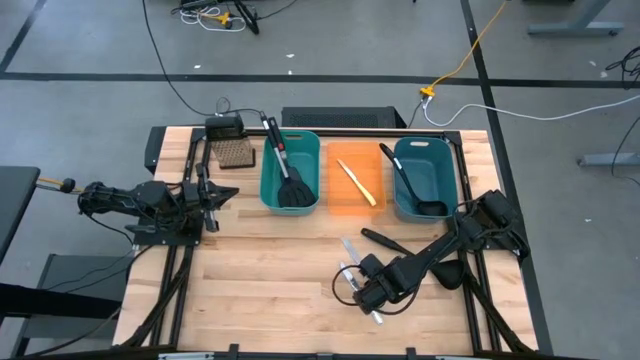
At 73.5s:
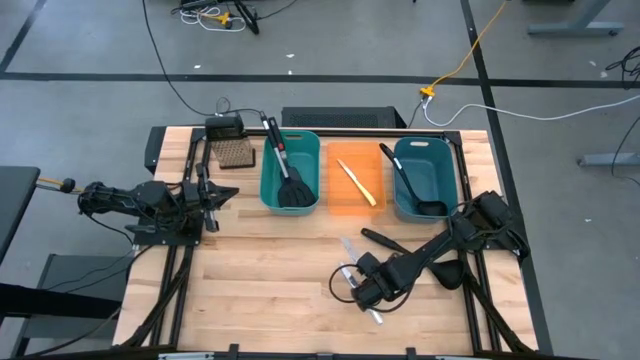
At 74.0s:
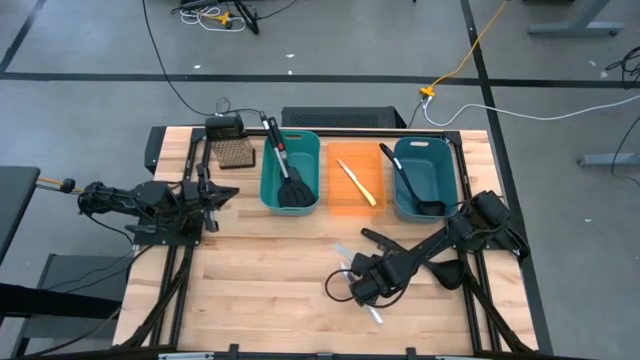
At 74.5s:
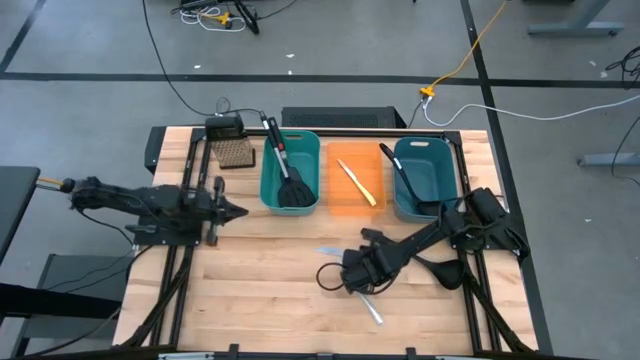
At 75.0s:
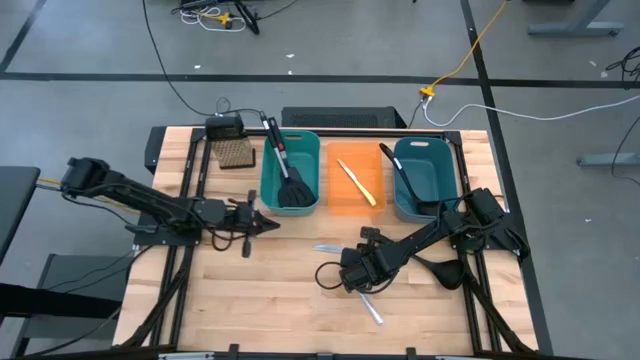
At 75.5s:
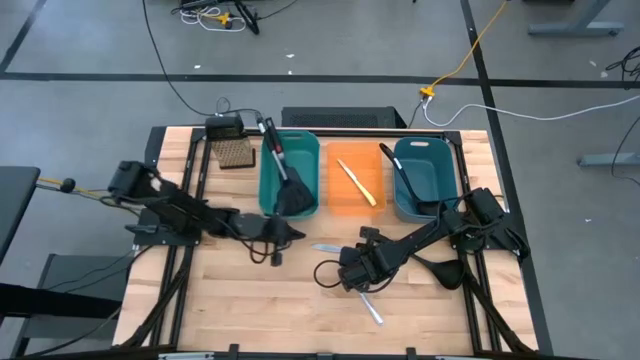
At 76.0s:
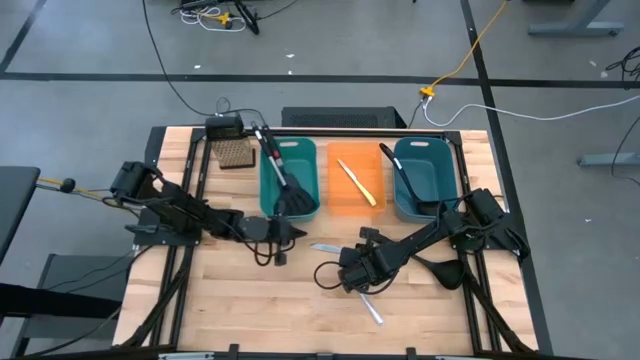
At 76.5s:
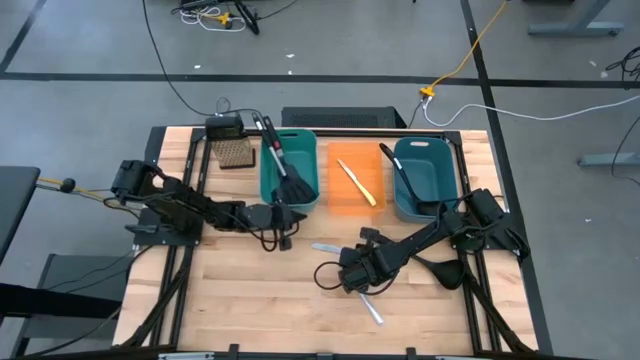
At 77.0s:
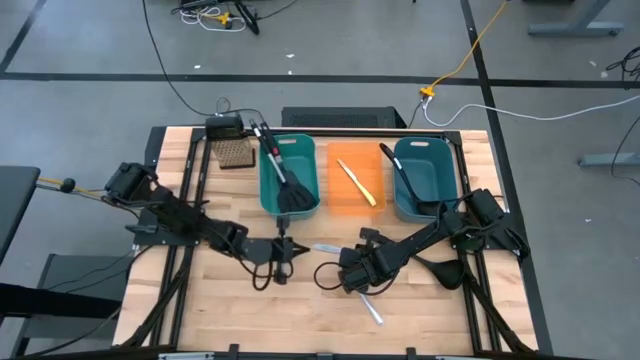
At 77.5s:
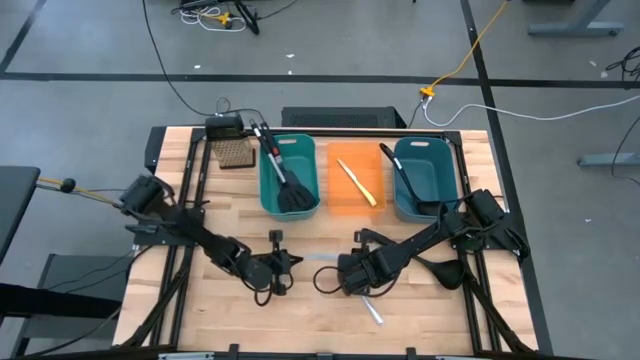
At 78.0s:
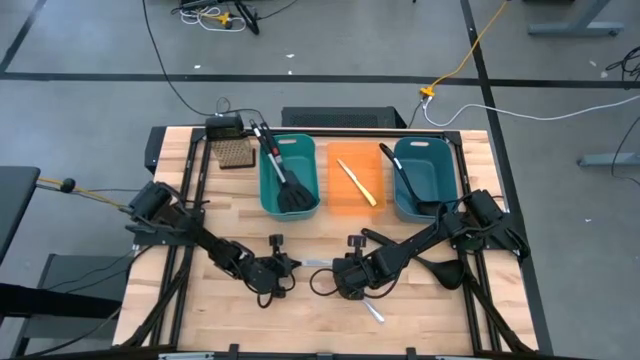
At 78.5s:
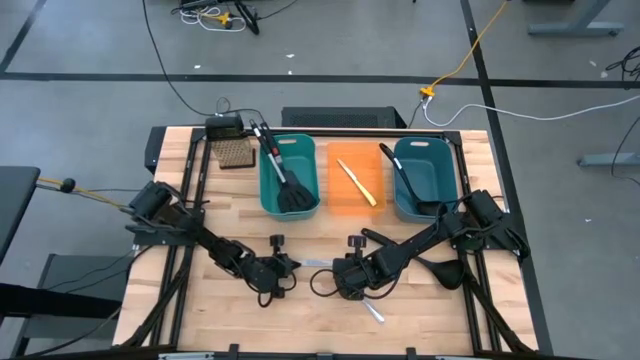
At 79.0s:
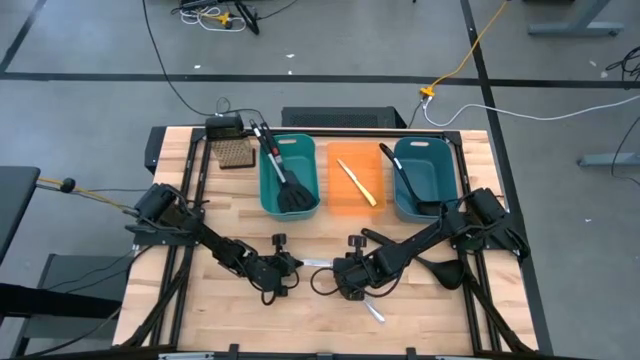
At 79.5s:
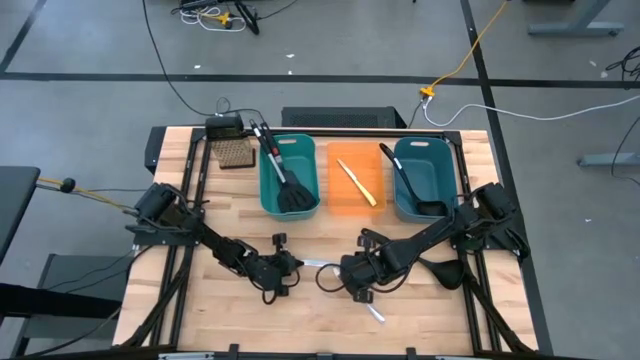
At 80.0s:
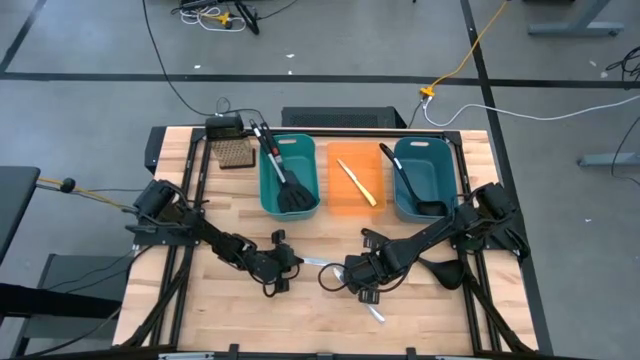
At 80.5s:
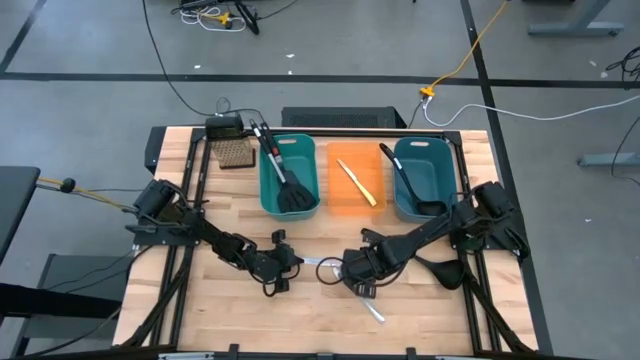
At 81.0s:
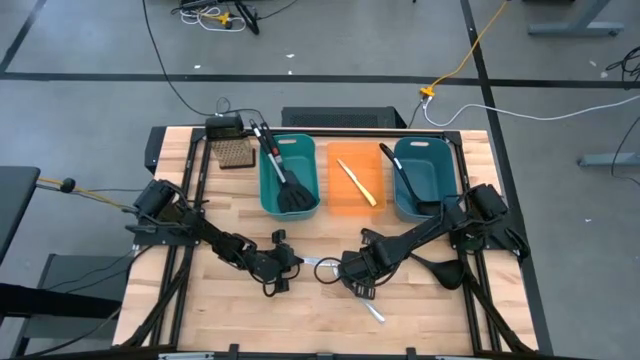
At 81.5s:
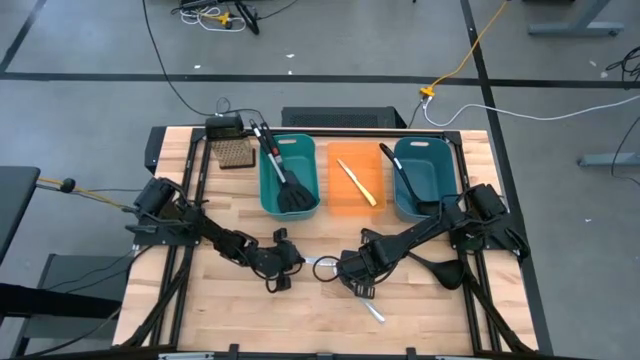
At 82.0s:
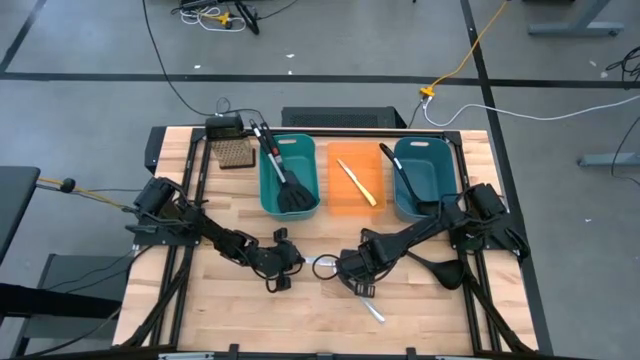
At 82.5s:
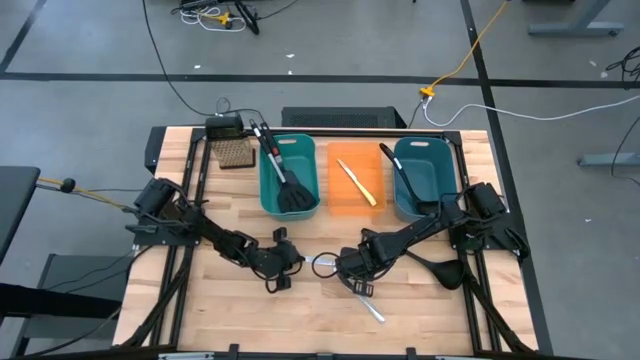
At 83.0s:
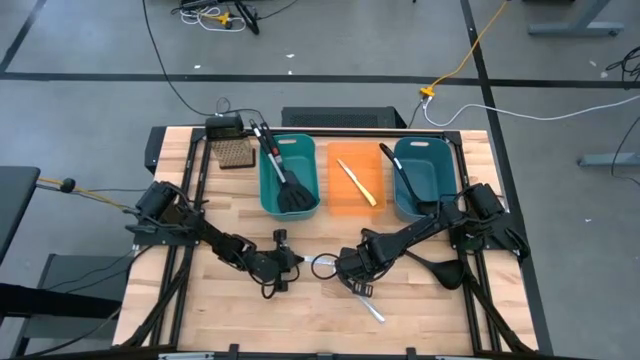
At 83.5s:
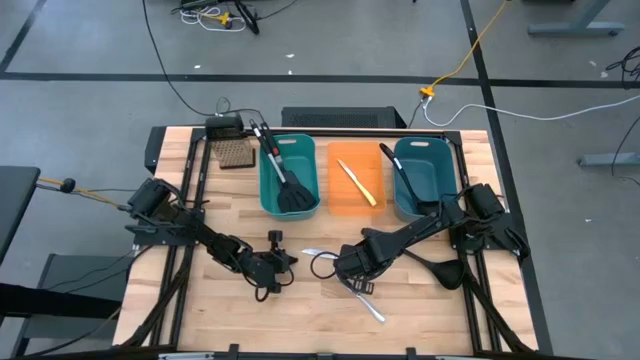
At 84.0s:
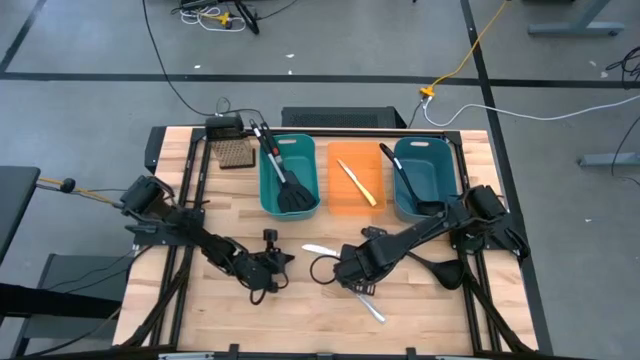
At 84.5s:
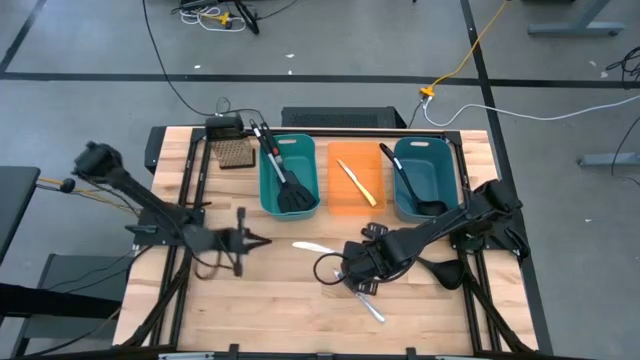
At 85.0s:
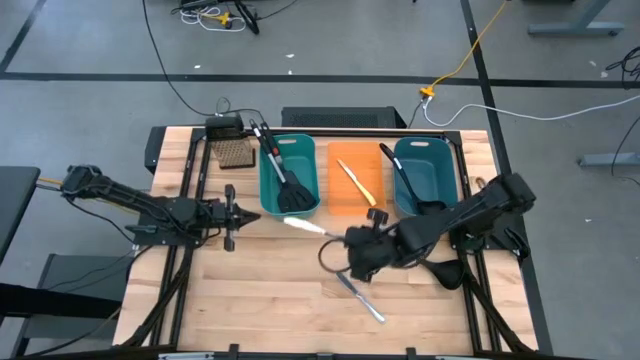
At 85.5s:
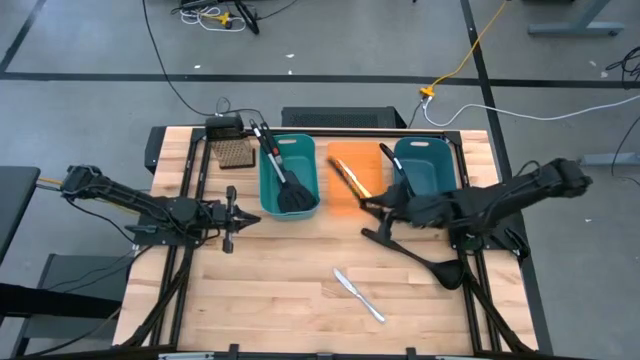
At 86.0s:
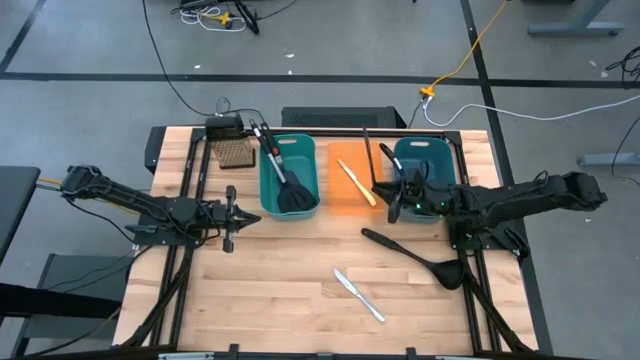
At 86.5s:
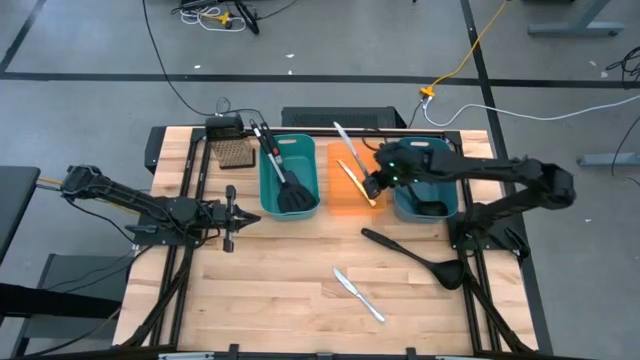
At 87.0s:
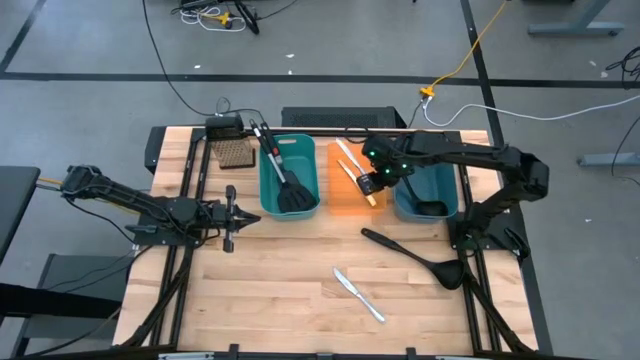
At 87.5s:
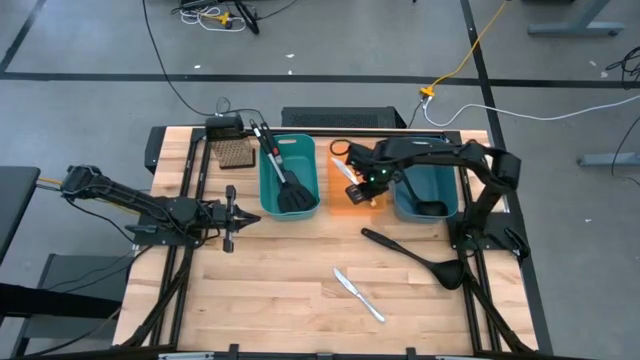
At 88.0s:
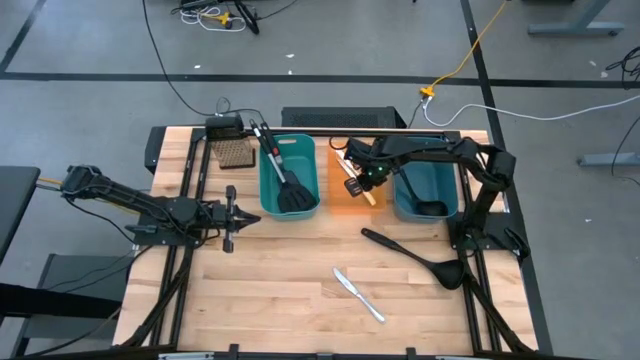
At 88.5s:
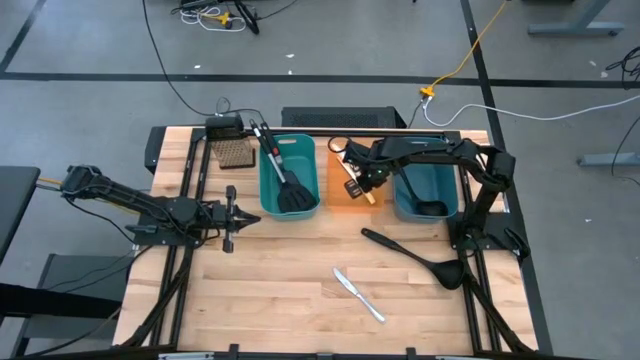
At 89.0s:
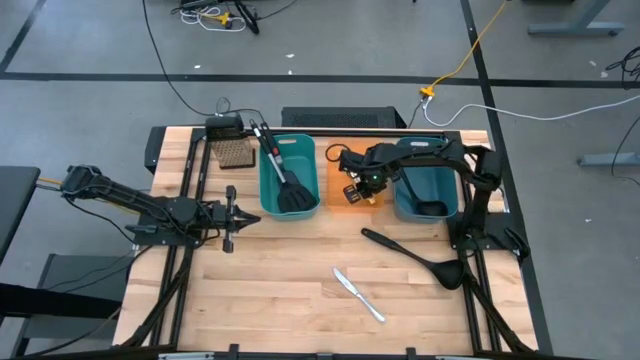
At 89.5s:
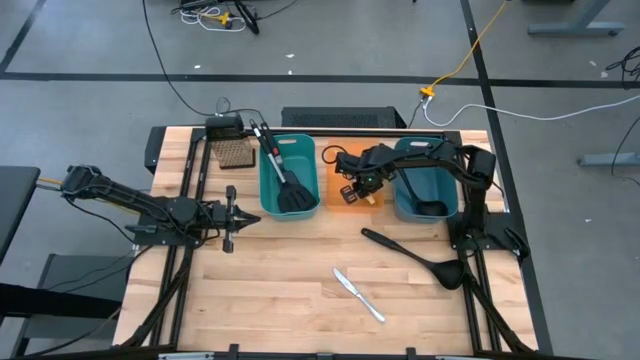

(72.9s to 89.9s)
Task: Pick & Place Kitchen Items
Put the right silver knife into the orange container

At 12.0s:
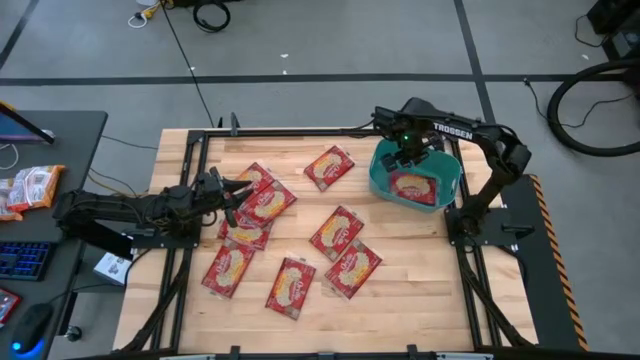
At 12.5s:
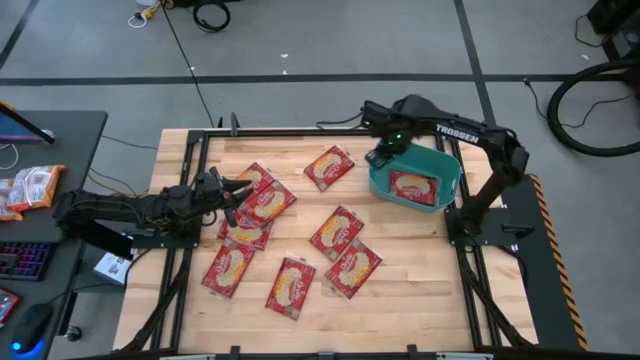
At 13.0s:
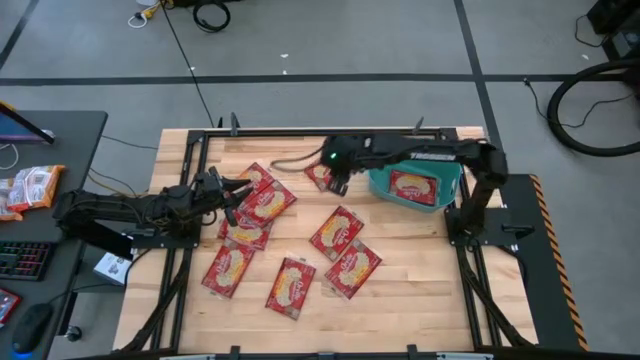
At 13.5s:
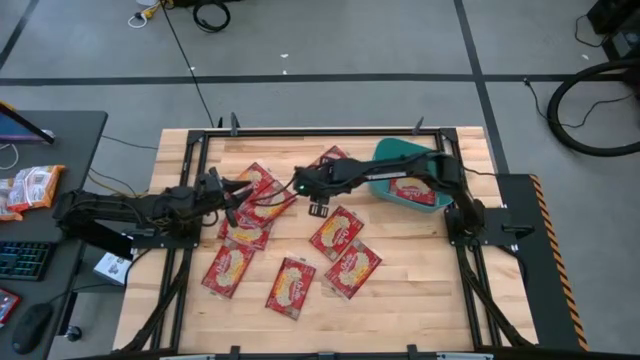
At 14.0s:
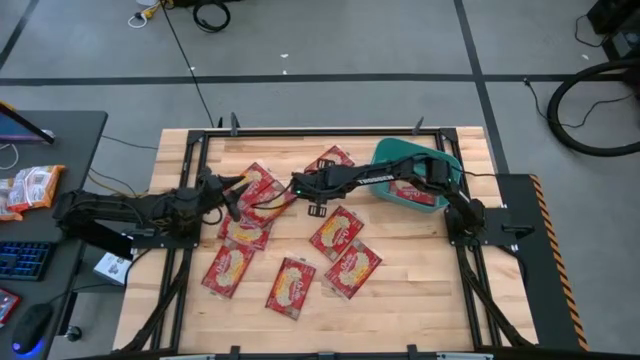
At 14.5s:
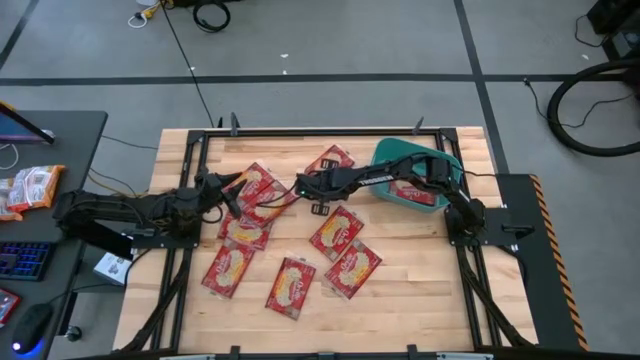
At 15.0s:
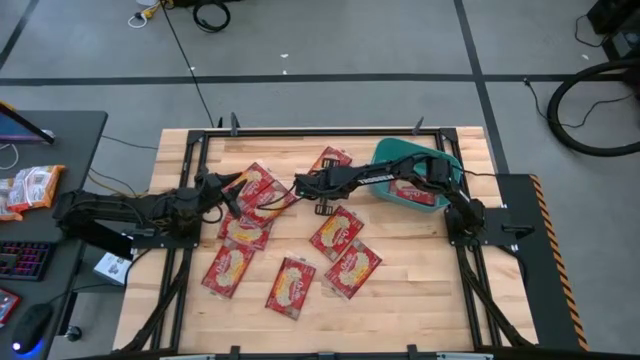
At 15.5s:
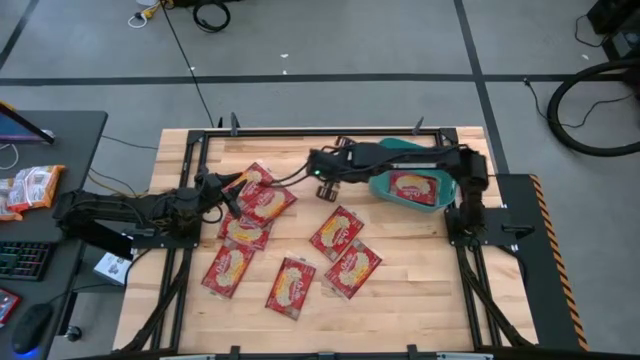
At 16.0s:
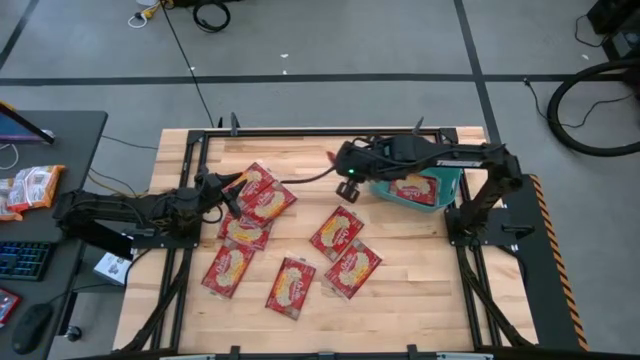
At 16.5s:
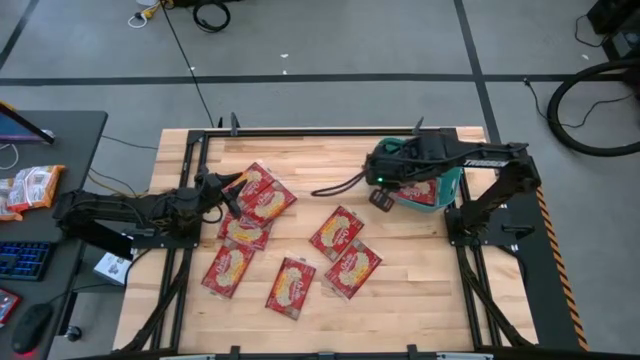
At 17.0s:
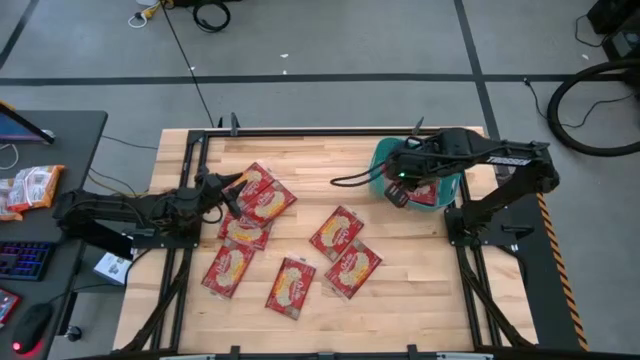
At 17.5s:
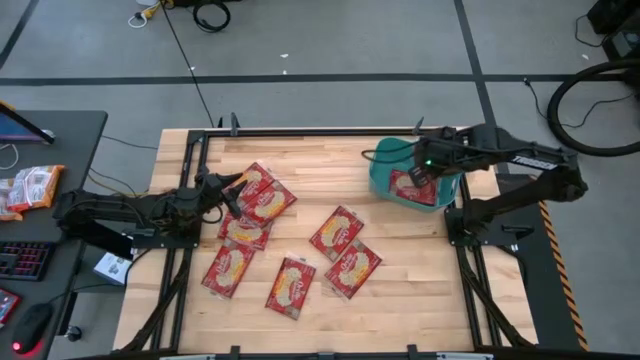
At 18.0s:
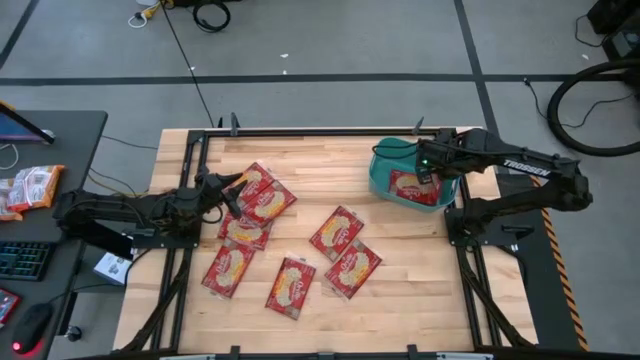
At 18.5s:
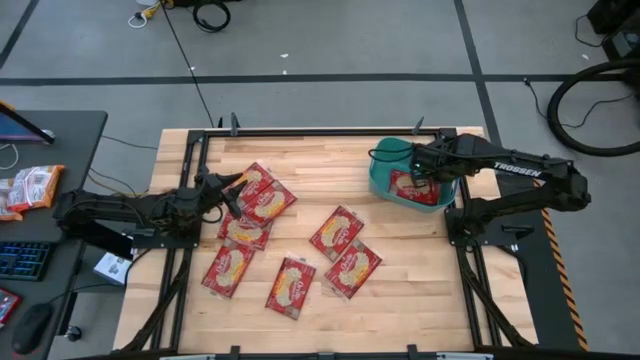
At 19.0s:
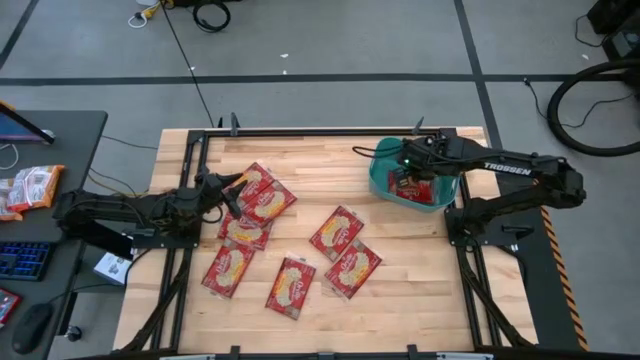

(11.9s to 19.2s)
Task: Sort popcorn bags into baskets
Put the red popcorn bag into the green container
